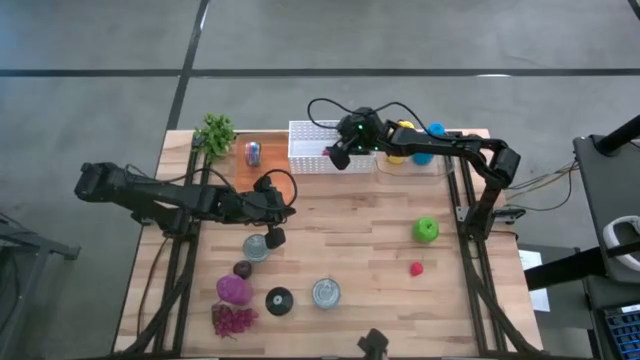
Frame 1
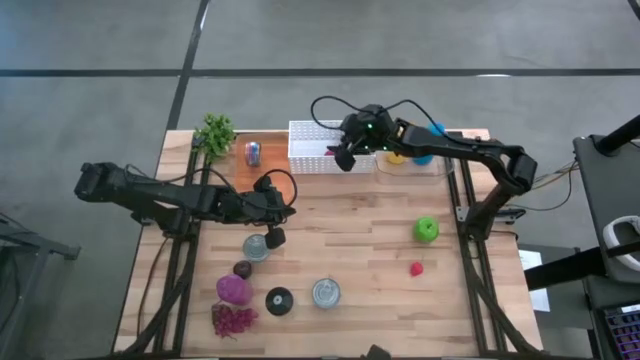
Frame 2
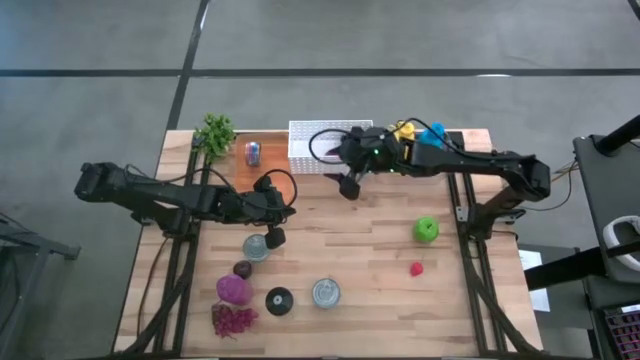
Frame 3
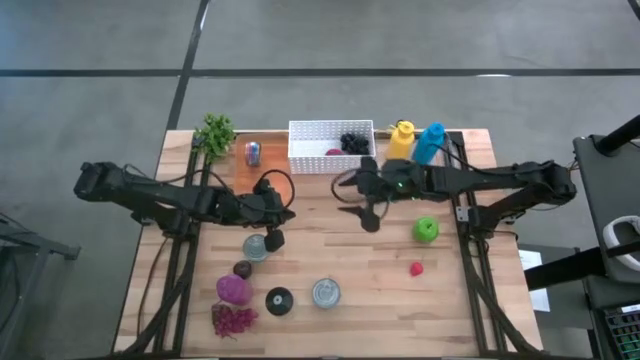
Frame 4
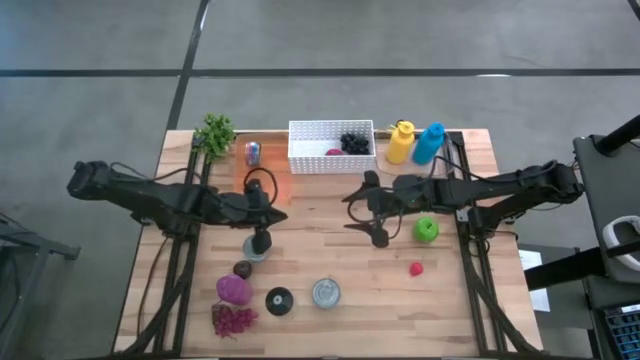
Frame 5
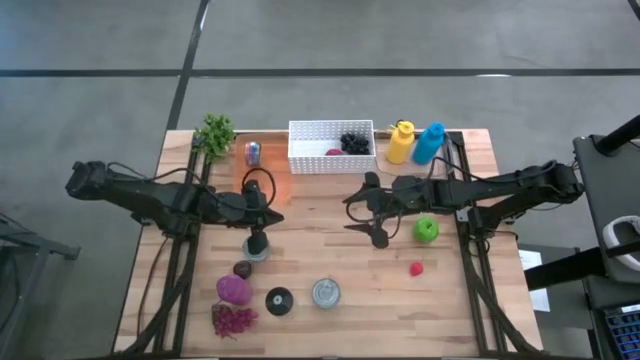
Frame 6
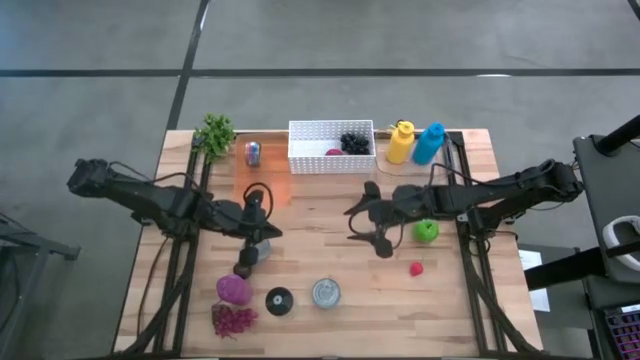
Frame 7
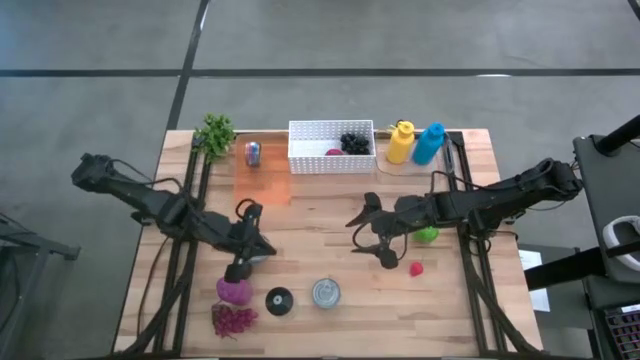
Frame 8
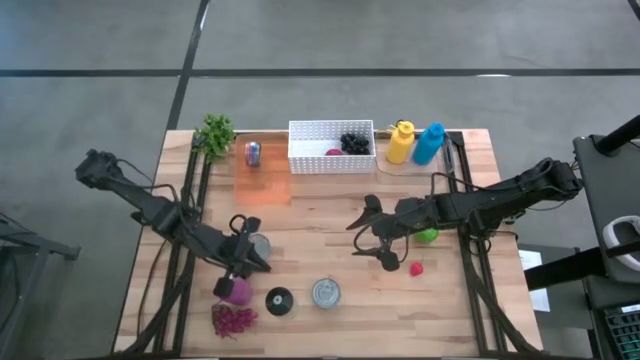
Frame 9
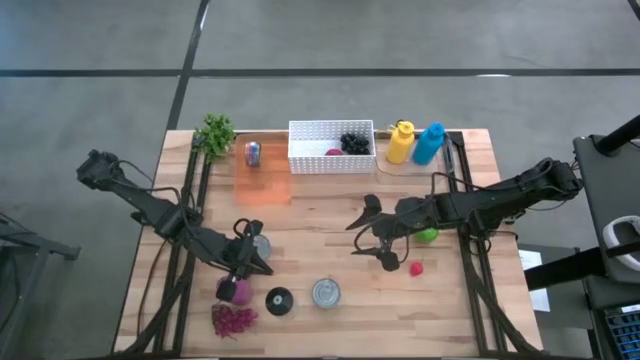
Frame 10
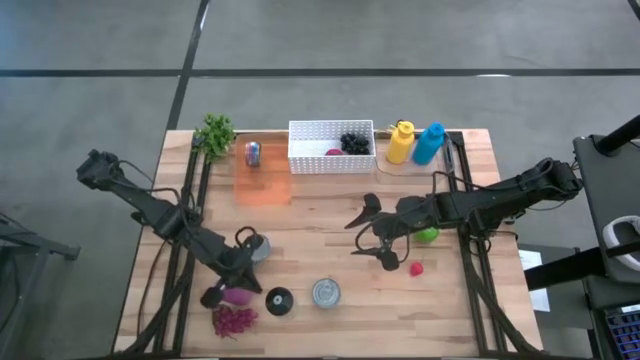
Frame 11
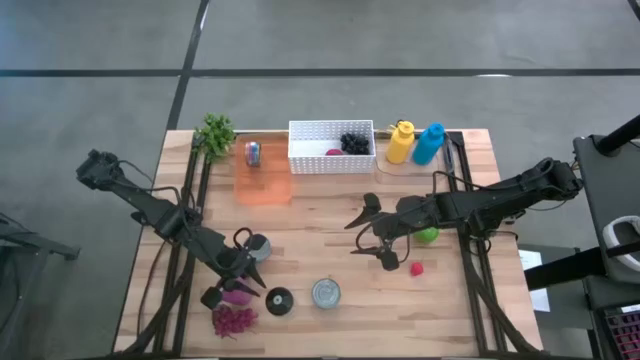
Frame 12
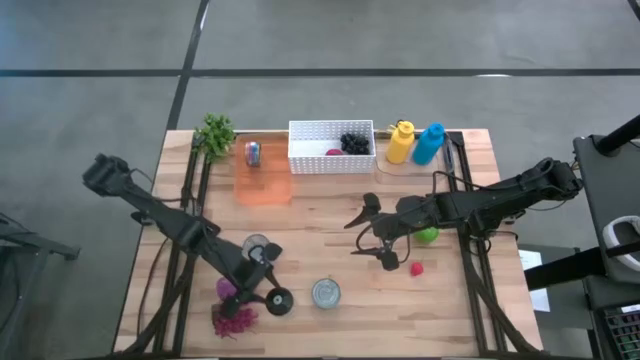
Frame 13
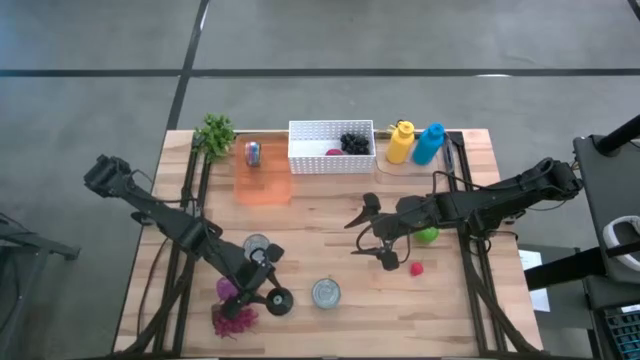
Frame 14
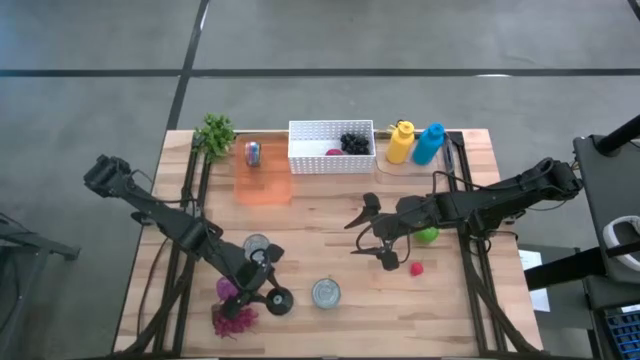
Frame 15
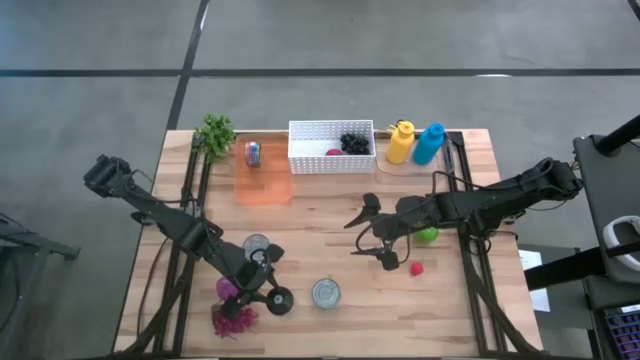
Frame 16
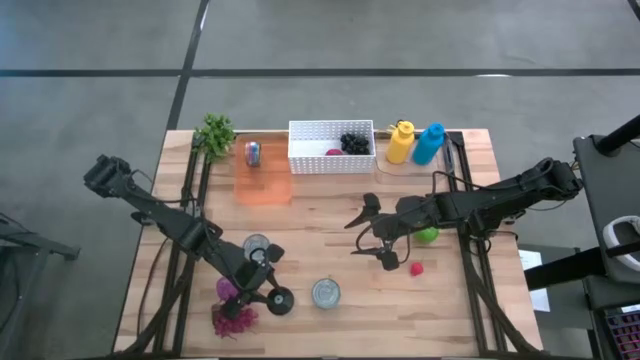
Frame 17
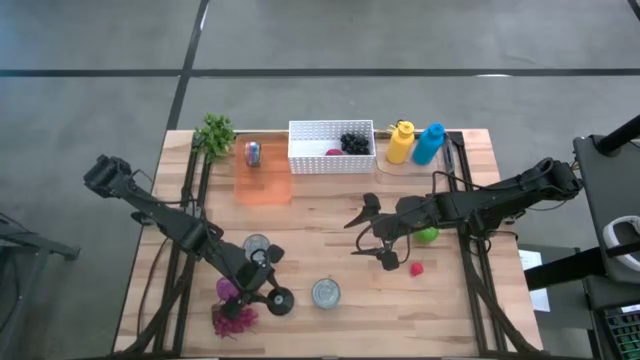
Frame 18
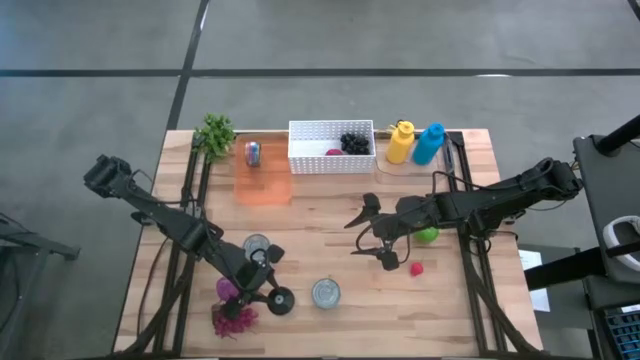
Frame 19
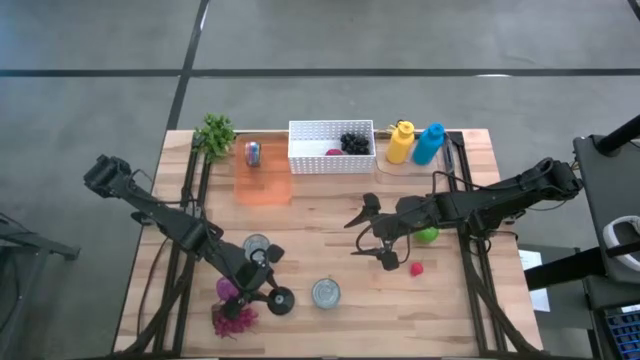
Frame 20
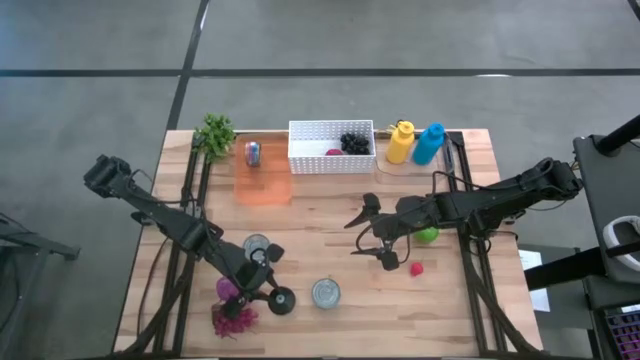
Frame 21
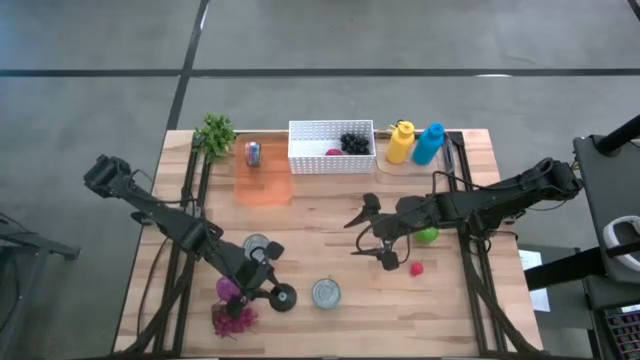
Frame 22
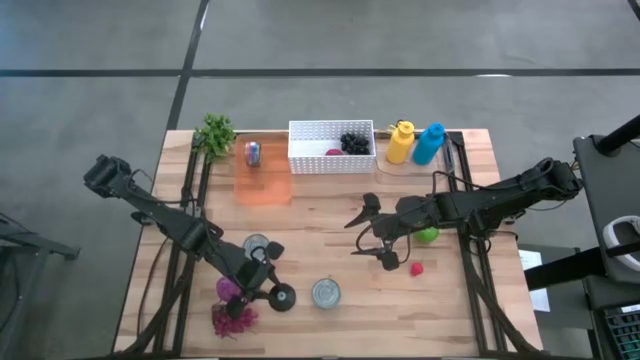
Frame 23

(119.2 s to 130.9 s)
Task: Pick & Place Food Item
Put the black water bottle into the transparent bin

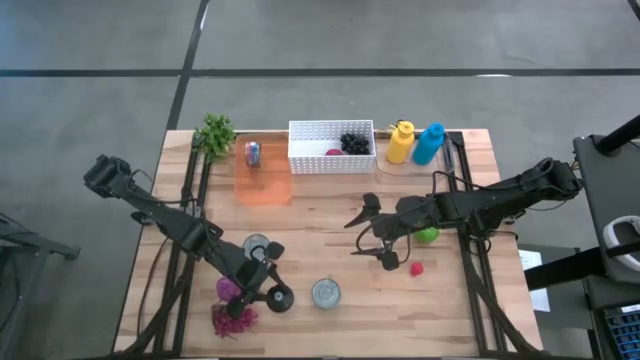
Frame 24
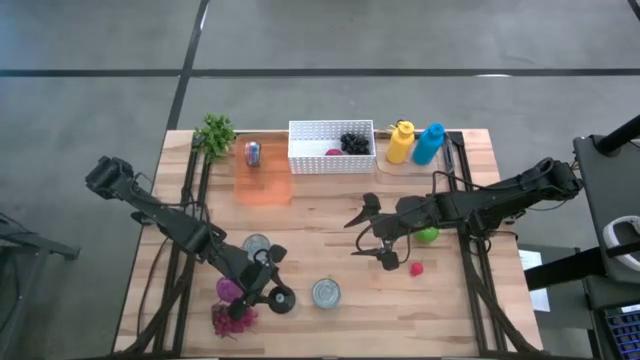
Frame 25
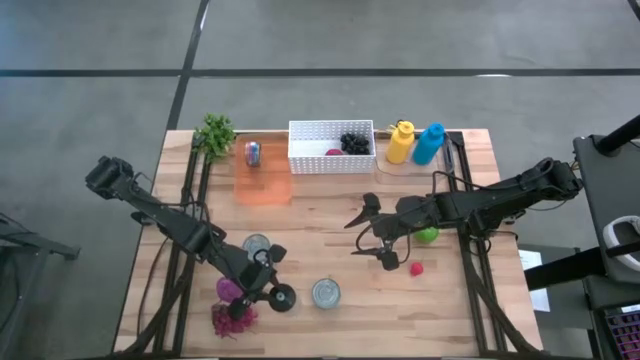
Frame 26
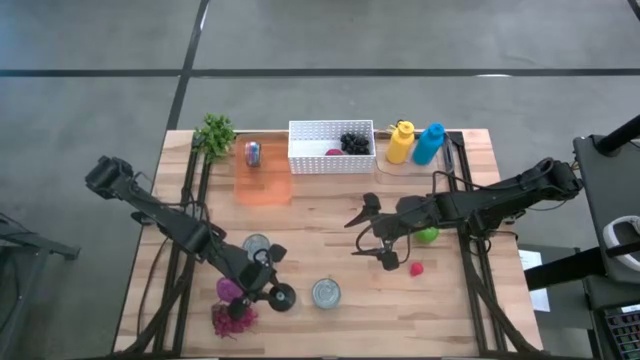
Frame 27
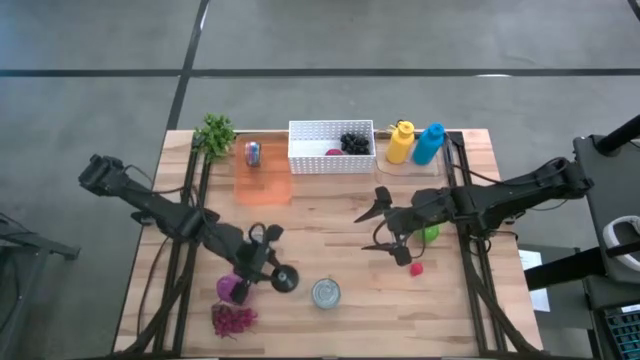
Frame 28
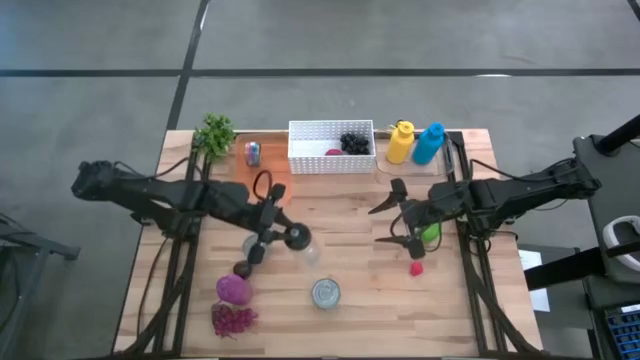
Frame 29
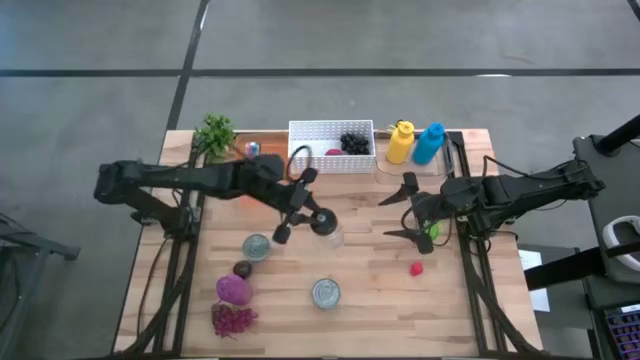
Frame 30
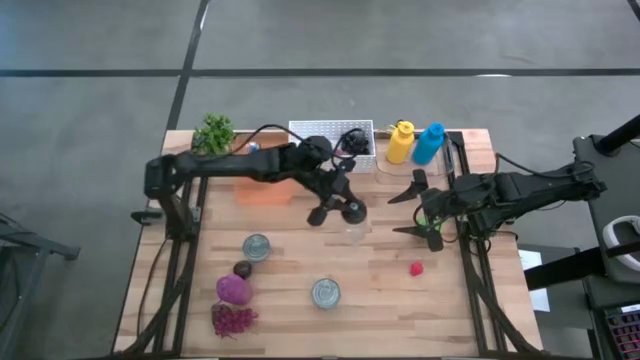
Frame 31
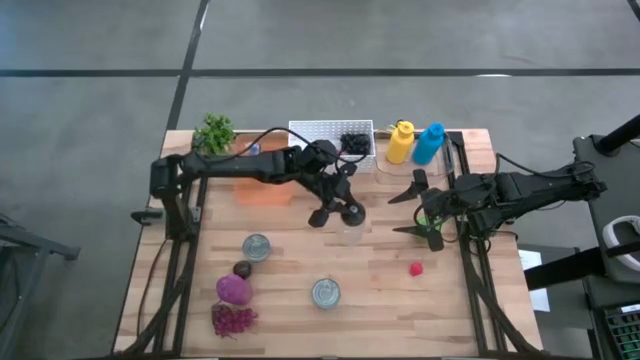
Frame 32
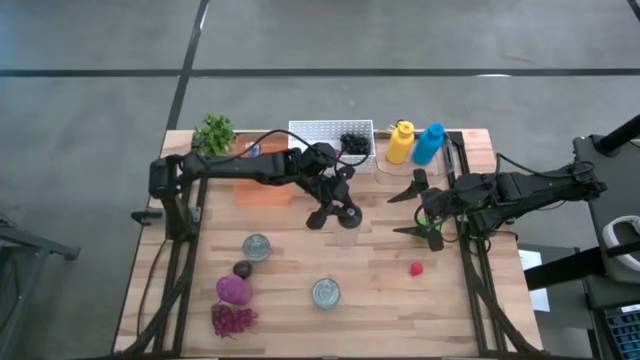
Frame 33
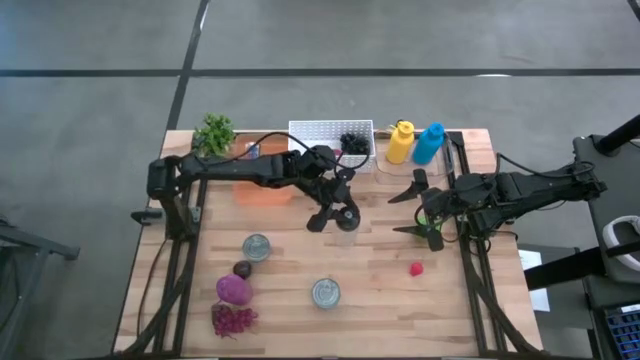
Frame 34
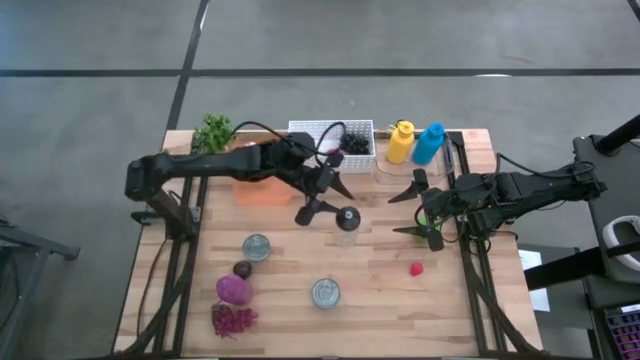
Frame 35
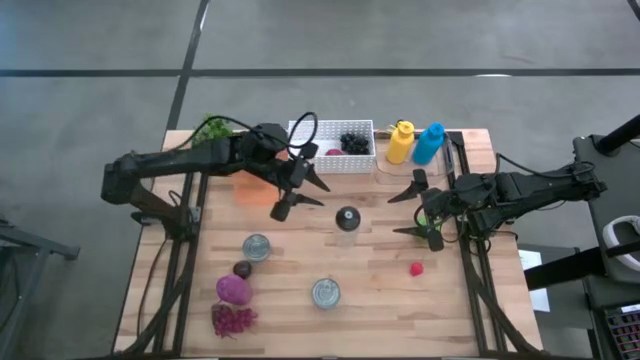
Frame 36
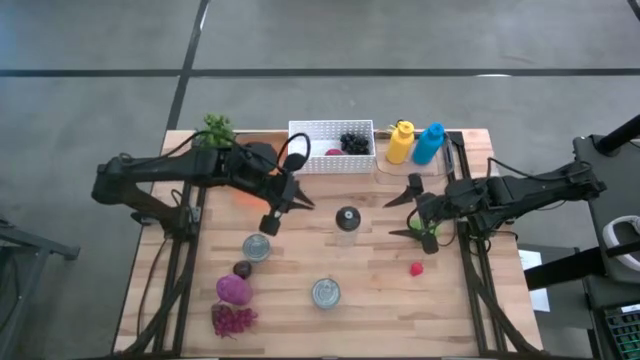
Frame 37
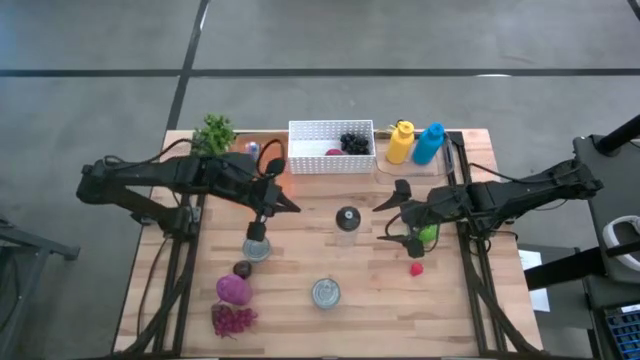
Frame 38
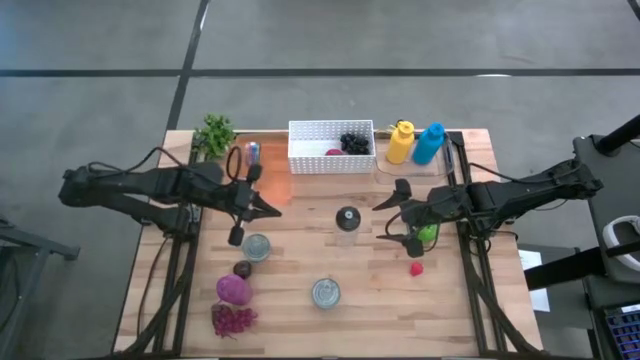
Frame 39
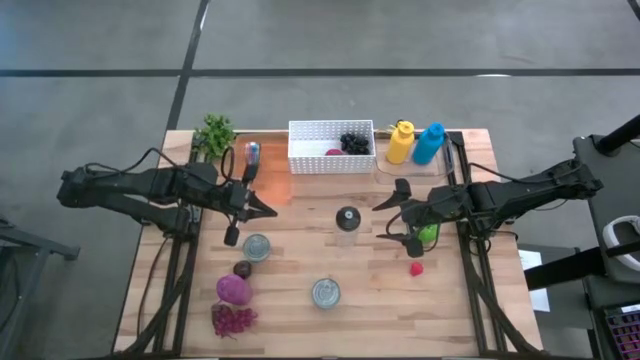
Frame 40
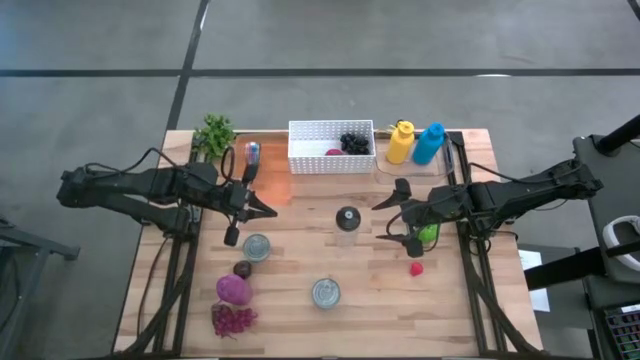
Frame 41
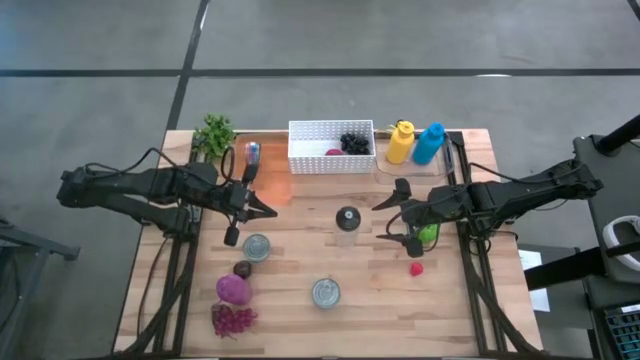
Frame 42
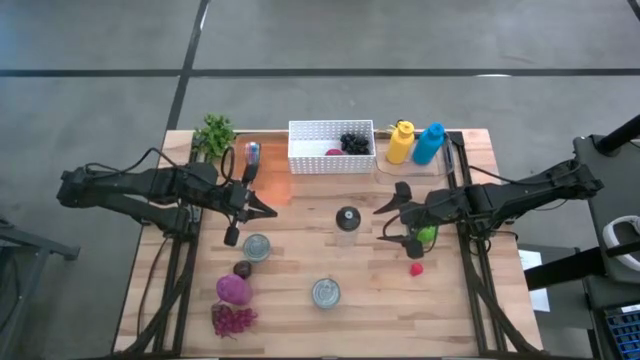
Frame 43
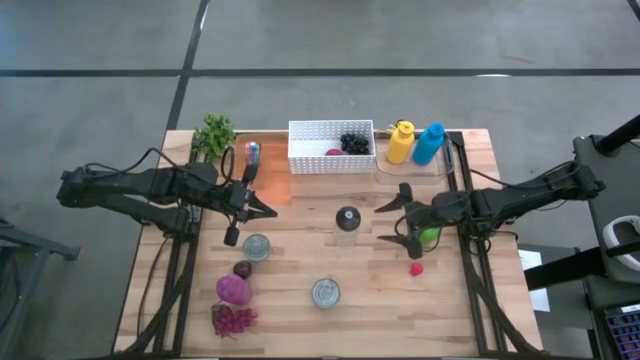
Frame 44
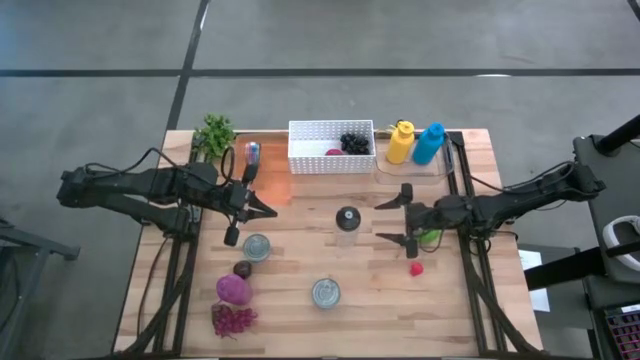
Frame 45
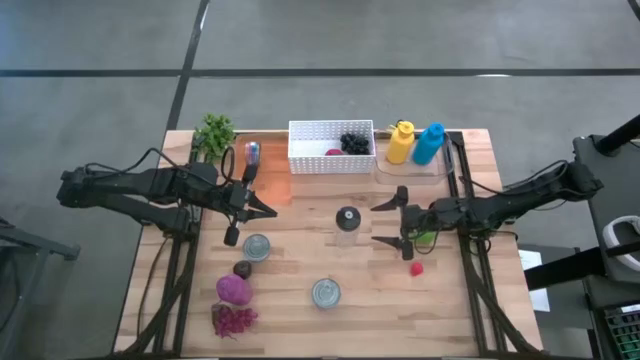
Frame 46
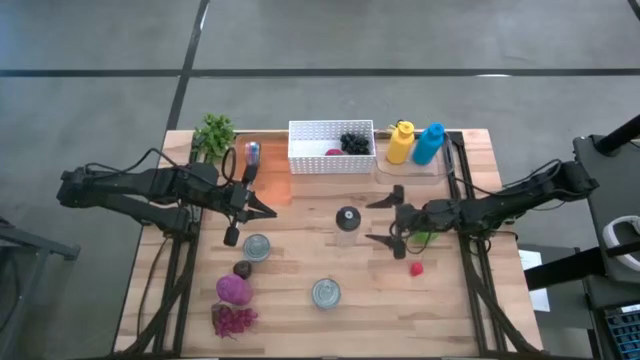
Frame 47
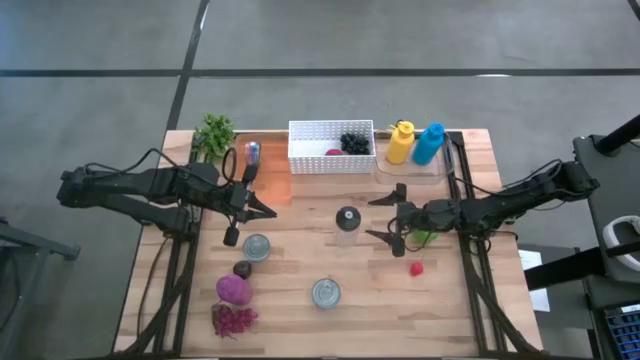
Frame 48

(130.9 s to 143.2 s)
Put the black water bottle into the transparent bin
